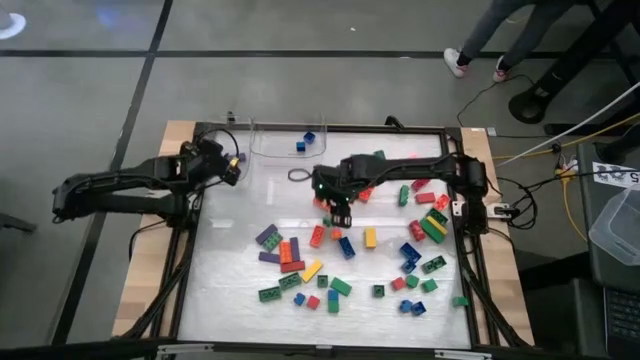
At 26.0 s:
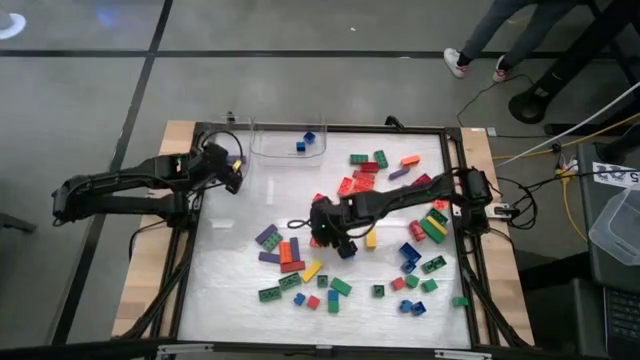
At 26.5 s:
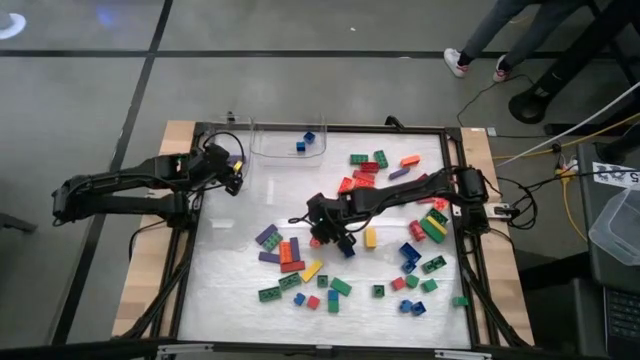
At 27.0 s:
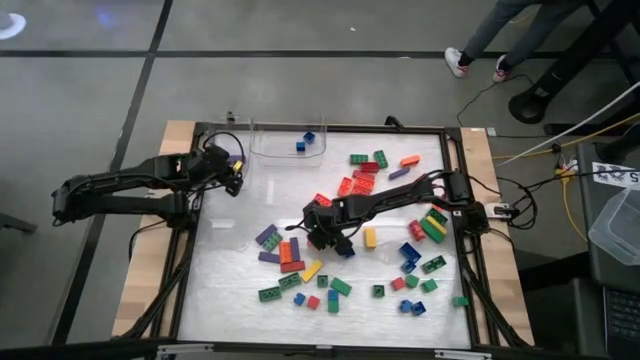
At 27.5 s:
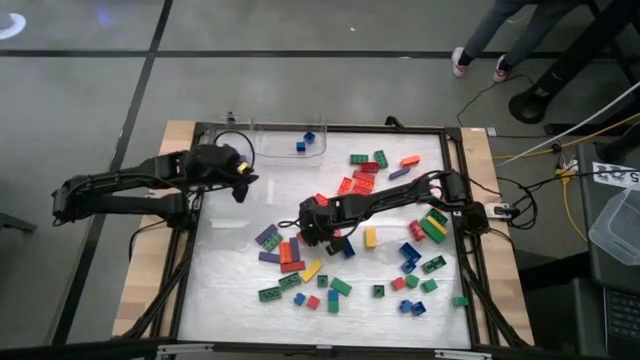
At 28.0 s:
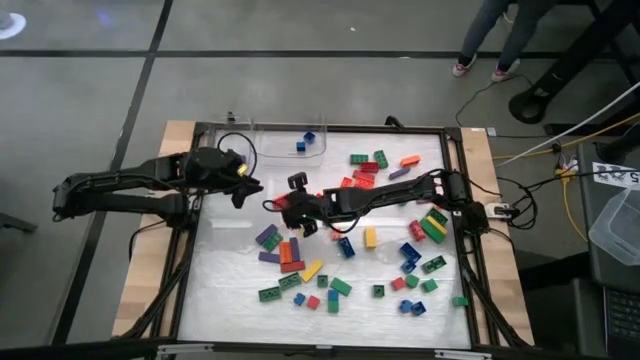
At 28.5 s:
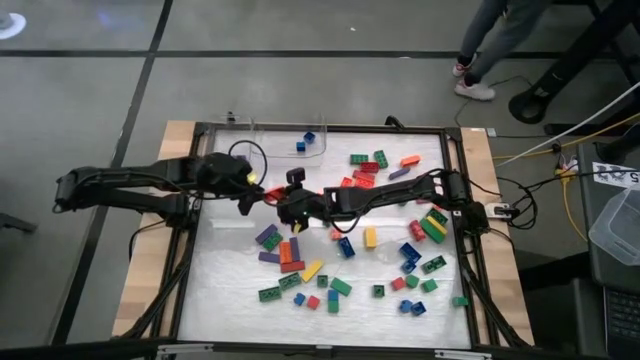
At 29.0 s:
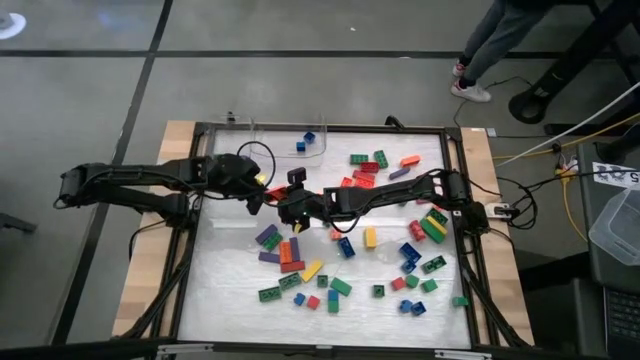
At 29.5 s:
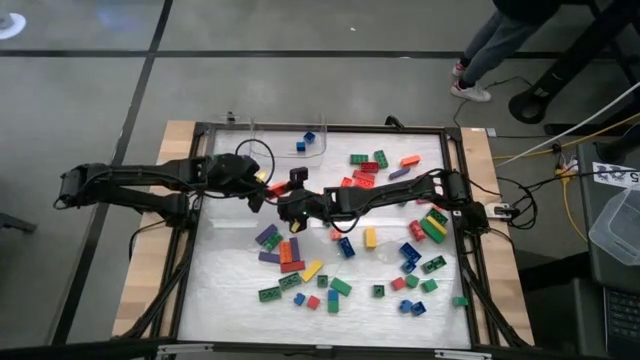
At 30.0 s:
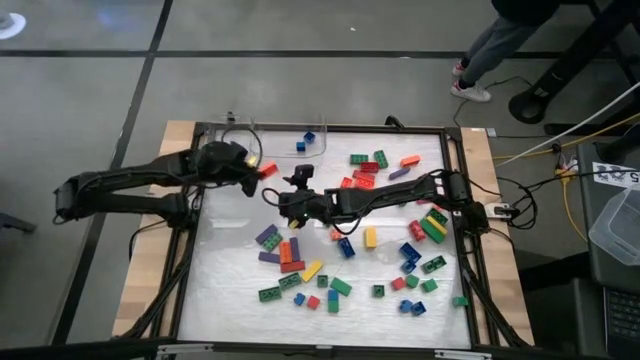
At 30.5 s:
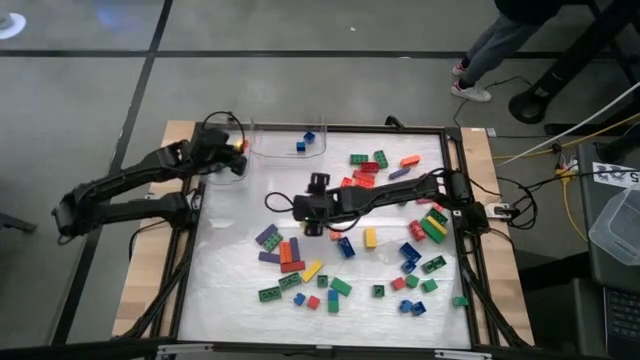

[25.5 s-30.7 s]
Task: Sort blocks by size
Put the large orange game piece into the left transparent bin

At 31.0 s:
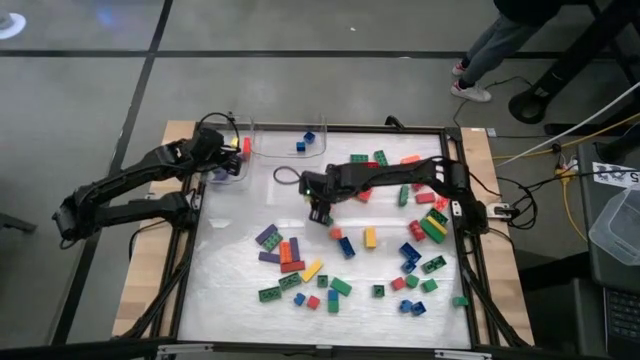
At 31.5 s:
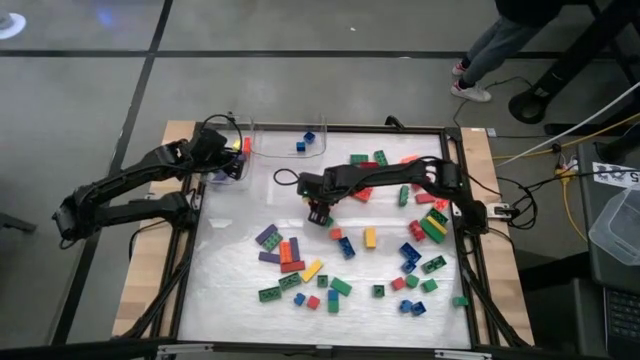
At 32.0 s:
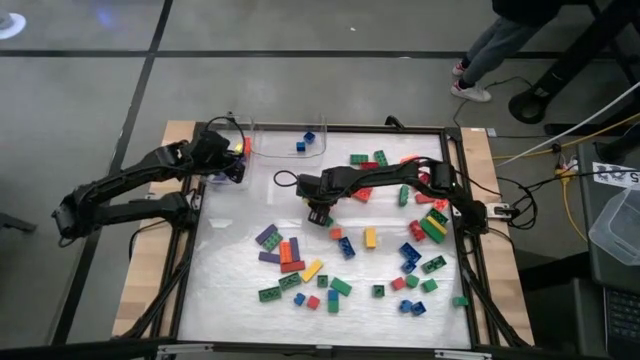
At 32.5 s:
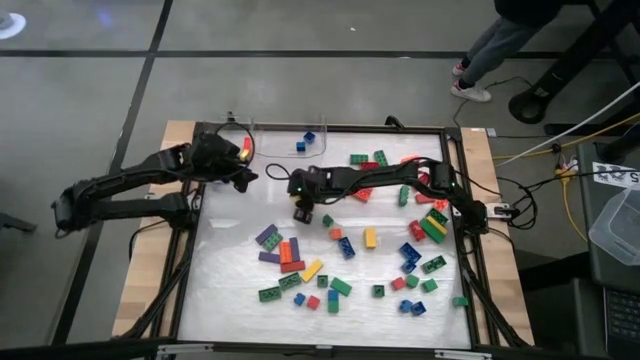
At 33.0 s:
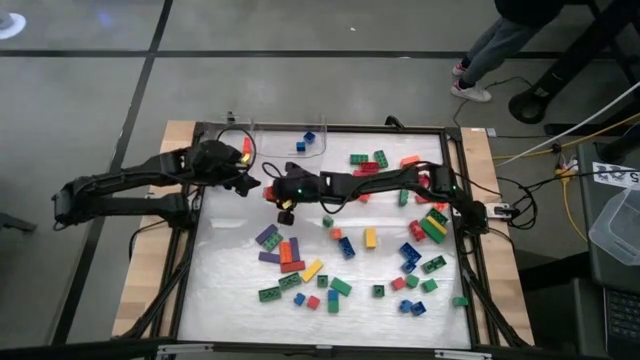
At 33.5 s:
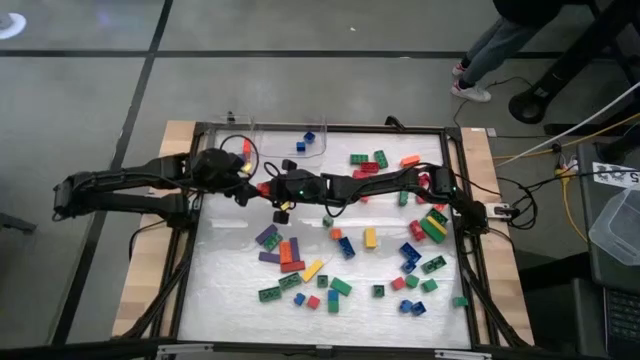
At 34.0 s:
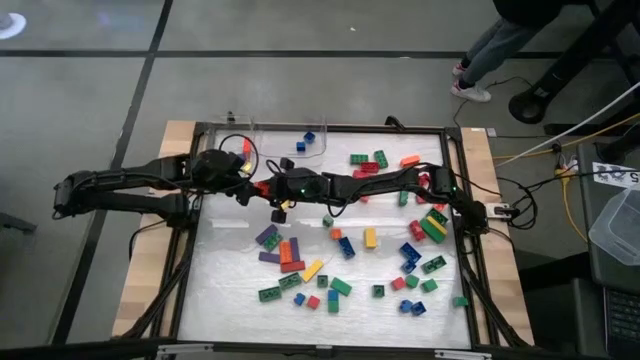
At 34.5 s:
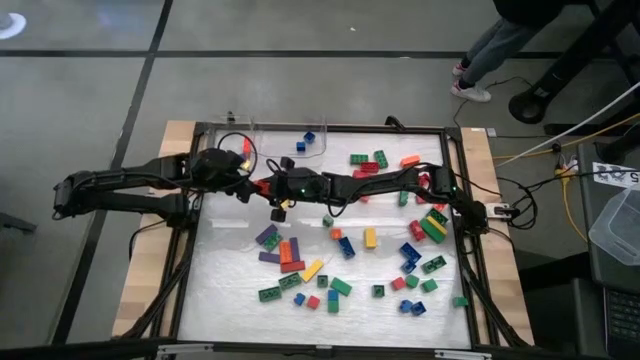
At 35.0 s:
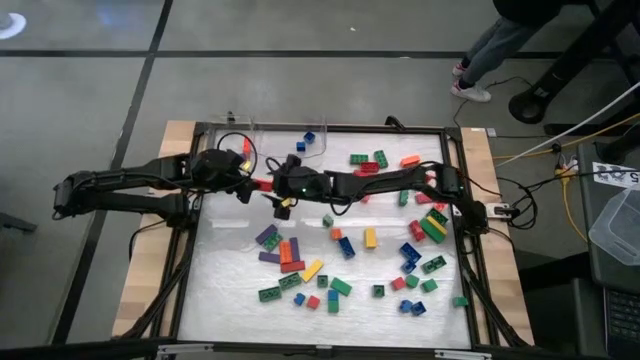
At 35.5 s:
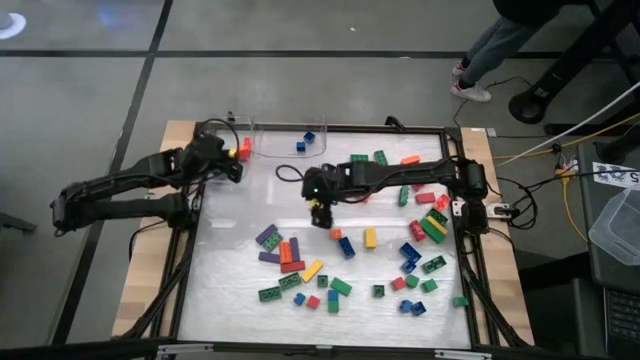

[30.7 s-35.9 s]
Put the large orange game piece into the left transparent bin

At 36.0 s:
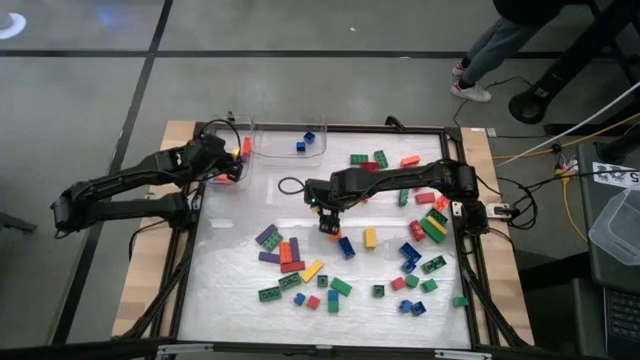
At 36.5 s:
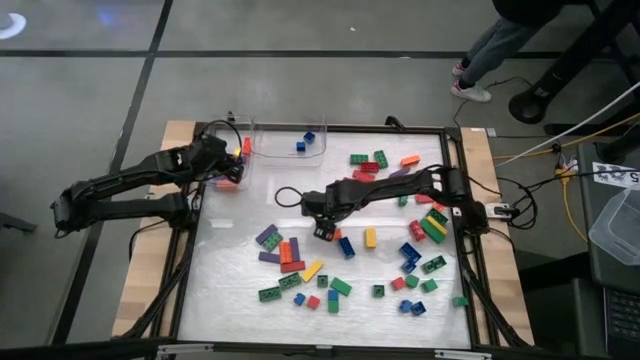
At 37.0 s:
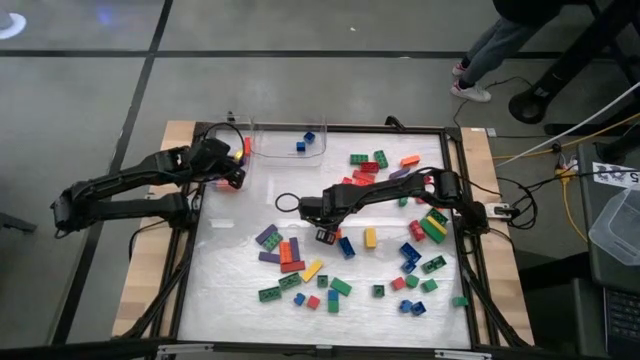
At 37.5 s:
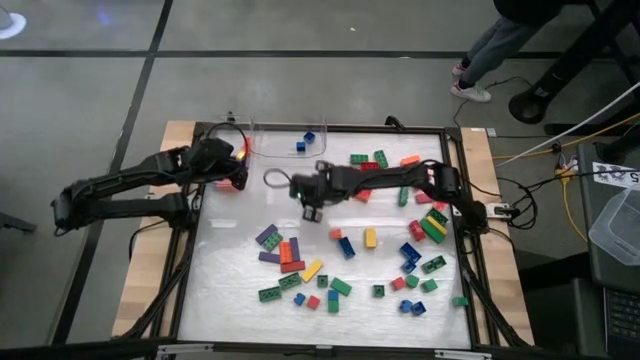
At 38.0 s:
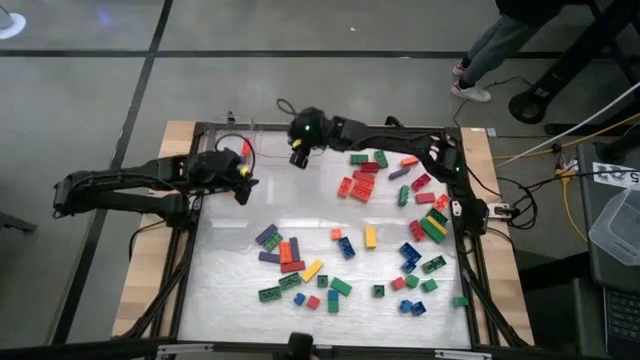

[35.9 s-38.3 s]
Put the small green game piece into the right transparent bin

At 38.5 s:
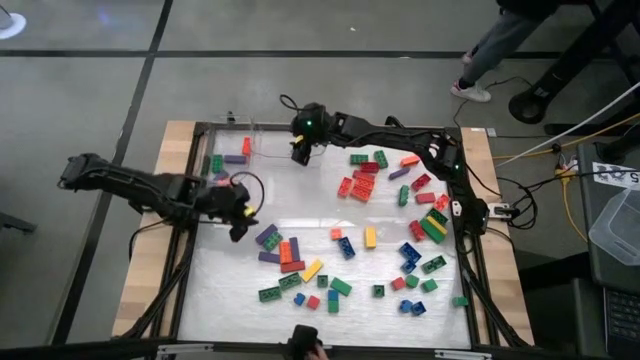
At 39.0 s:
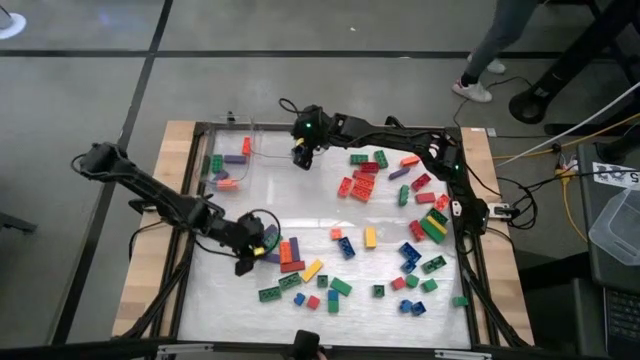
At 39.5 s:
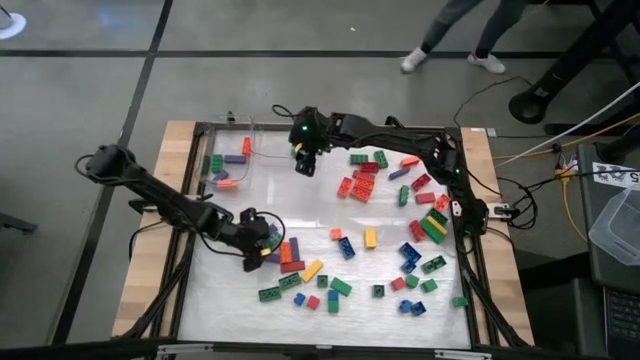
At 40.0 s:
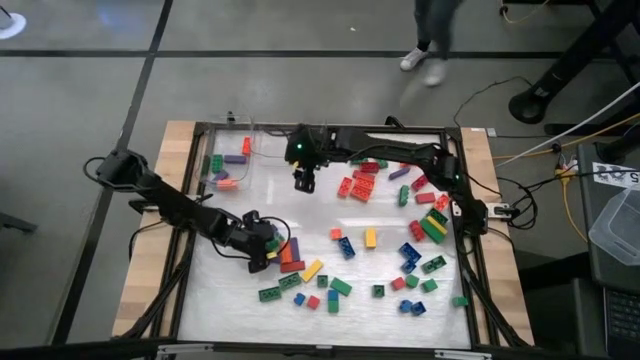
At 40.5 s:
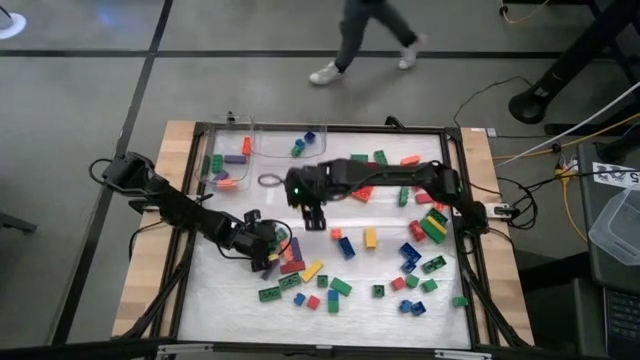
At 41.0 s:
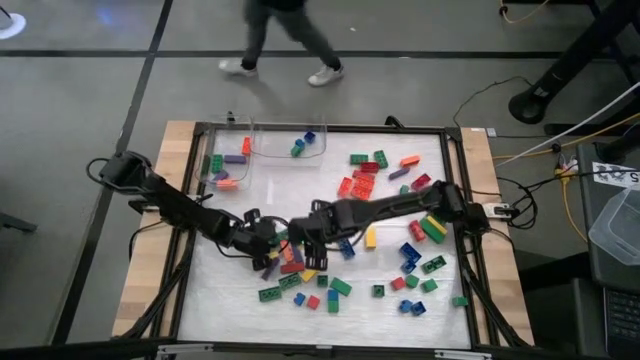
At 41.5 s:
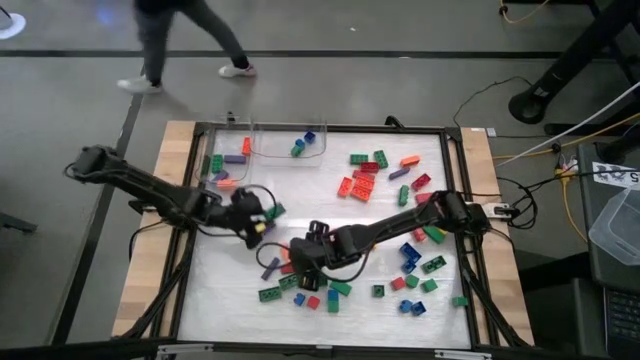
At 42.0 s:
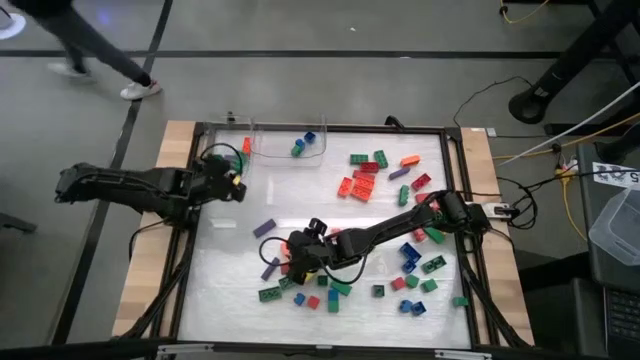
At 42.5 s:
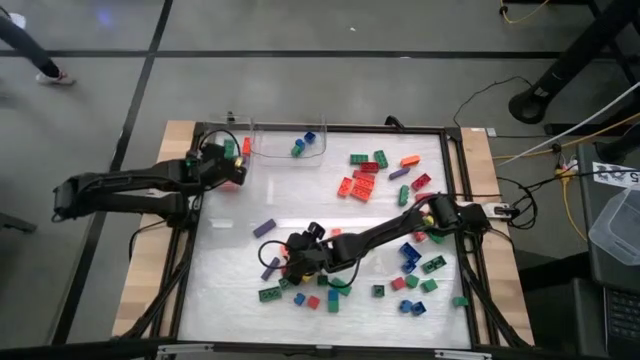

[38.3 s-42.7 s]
Put the large green game piece into the left transparent bin

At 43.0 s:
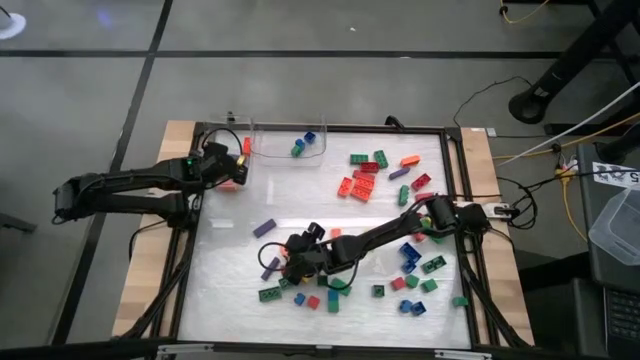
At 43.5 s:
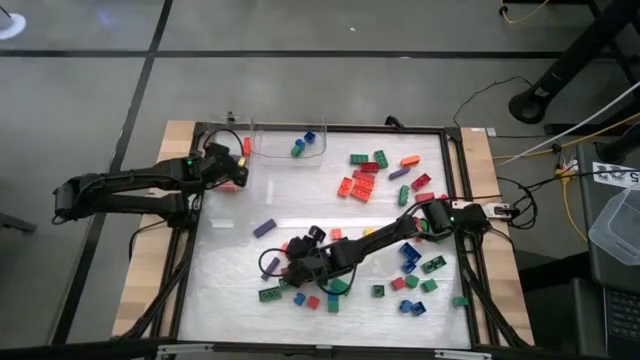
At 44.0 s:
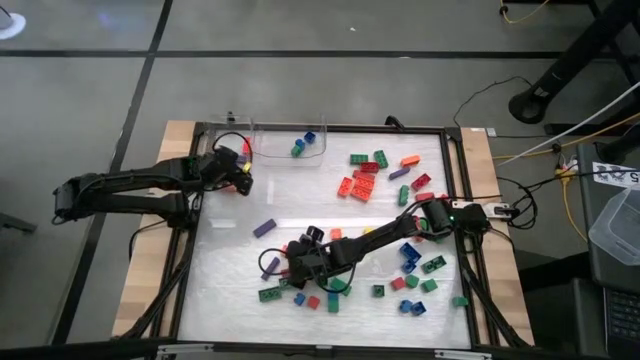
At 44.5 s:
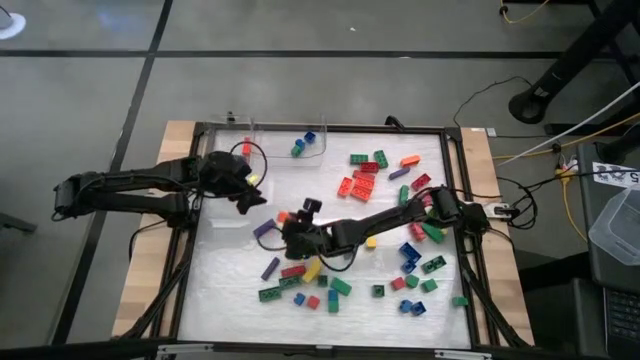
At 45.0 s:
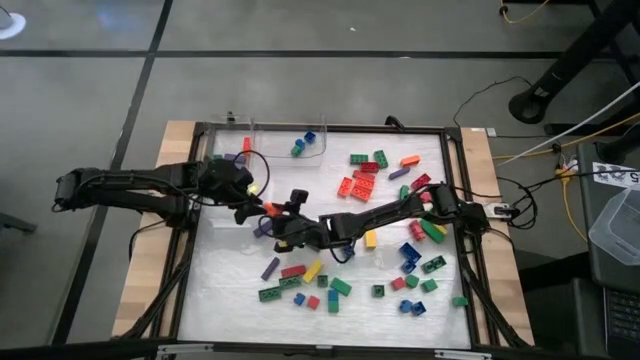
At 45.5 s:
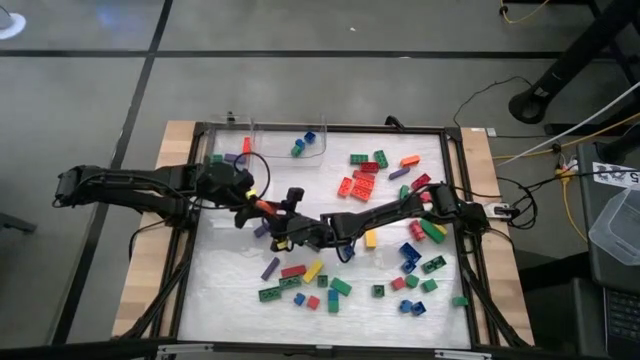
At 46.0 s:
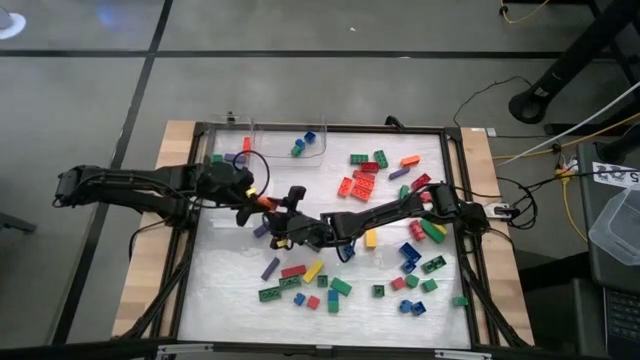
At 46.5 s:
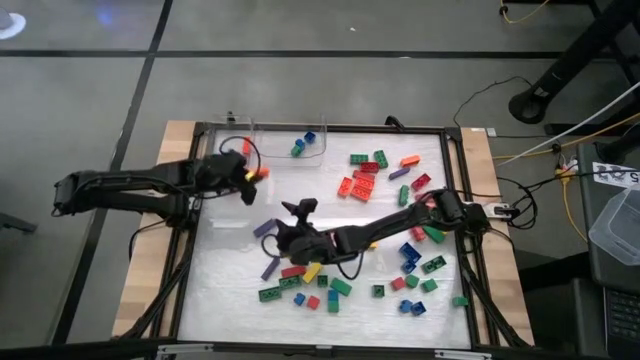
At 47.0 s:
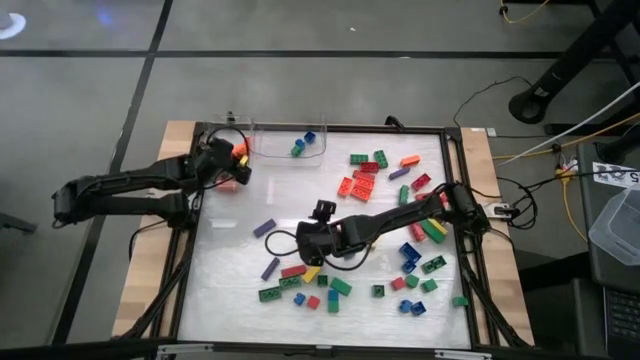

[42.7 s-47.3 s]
Put the large orange game piece into the left transparent bin
